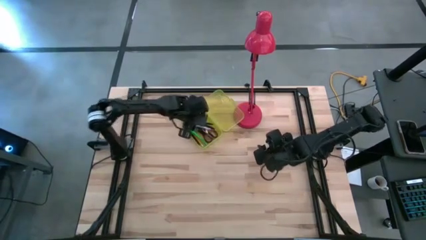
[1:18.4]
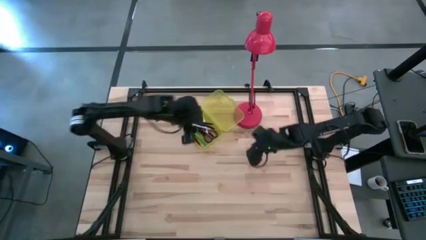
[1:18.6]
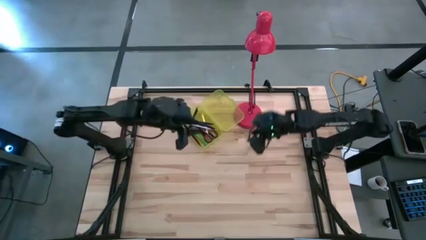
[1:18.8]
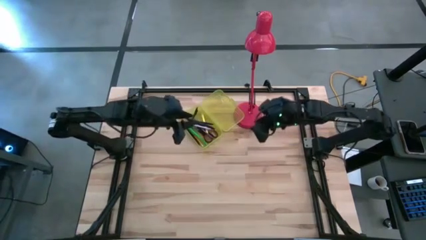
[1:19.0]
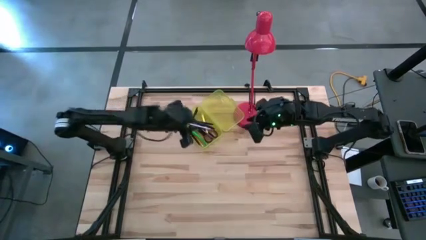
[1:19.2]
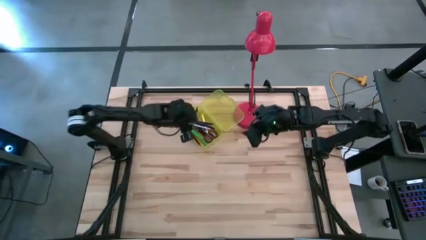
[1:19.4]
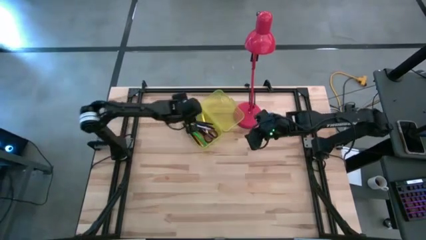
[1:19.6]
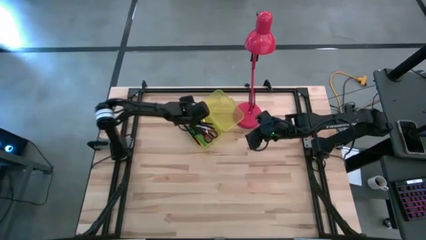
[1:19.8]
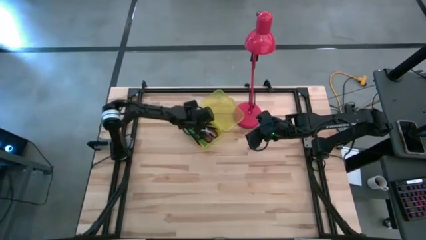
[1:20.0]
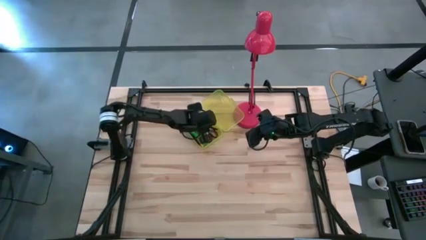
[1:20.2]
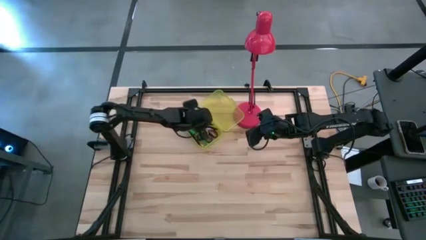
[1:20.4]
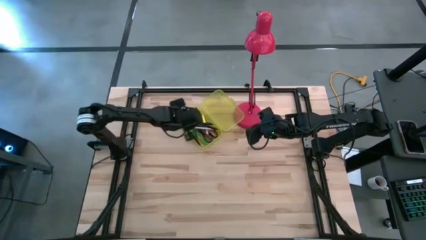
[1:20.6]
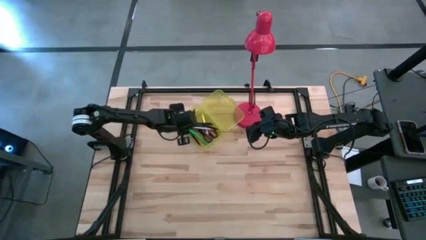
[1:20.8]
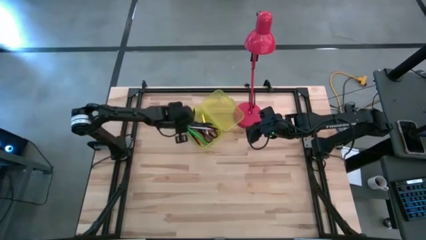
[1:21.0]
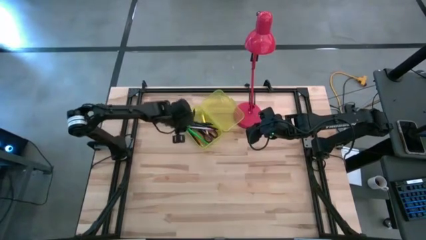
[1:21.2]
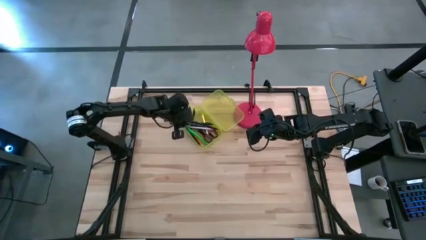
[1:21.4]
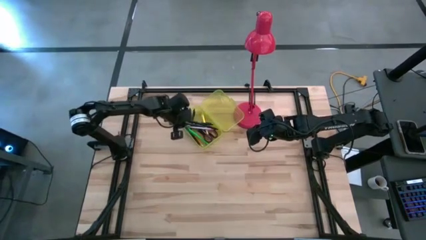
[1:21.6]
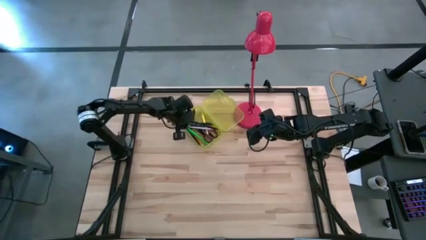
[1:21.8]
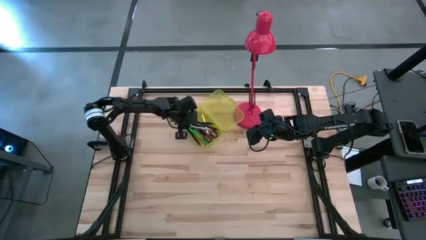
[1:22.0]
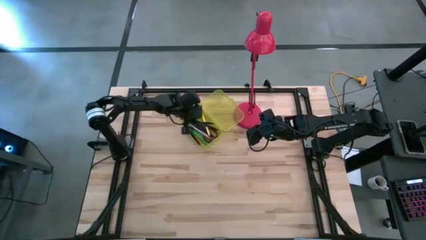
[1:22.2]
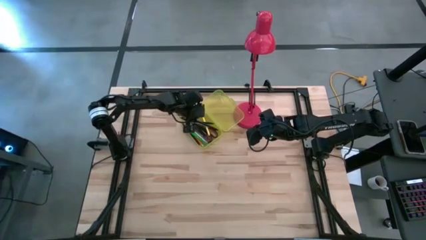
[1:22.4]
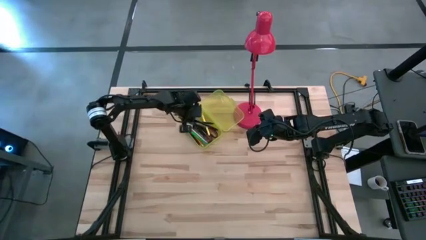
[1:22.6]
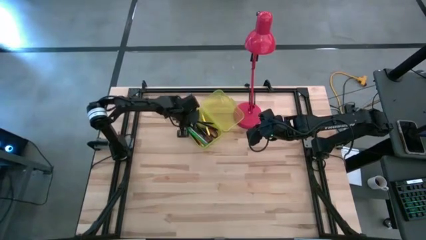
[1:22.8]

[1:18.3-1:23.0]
Task: Pick & place school supplies into a supply box
Adjust the pens inside the yellow supply box

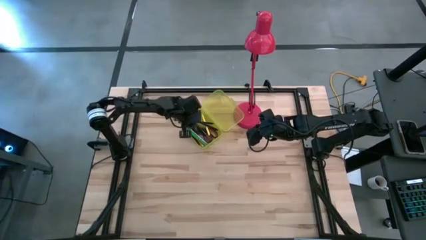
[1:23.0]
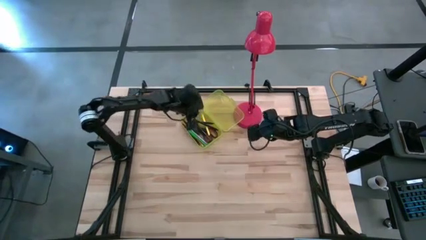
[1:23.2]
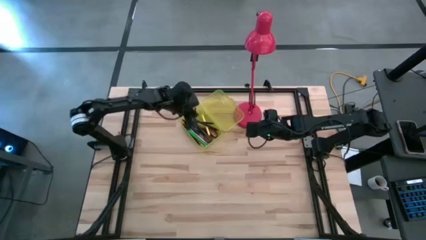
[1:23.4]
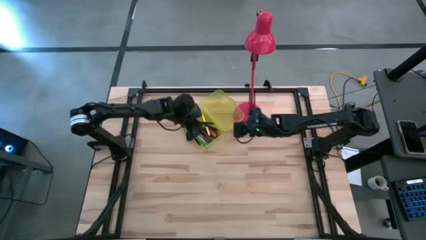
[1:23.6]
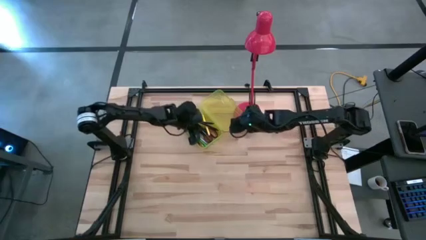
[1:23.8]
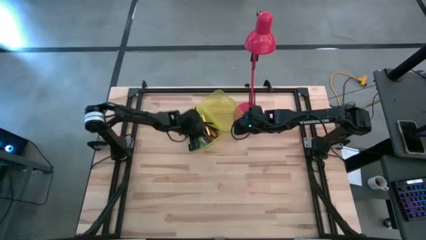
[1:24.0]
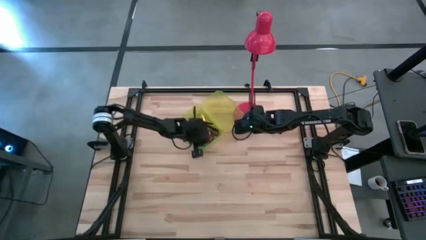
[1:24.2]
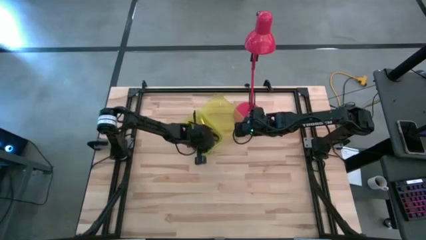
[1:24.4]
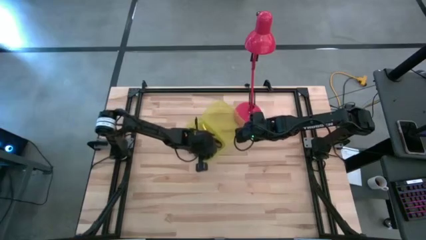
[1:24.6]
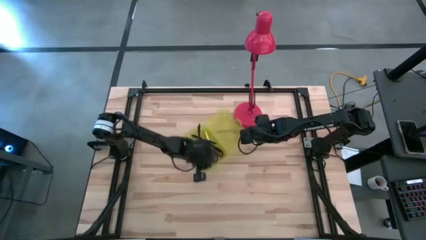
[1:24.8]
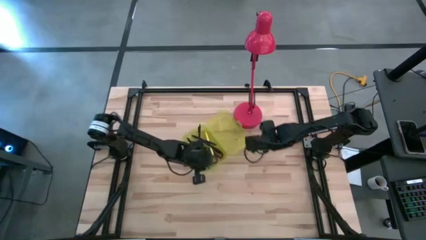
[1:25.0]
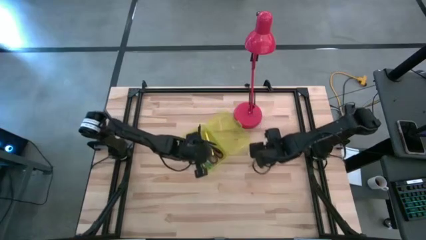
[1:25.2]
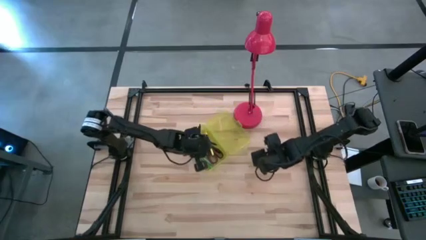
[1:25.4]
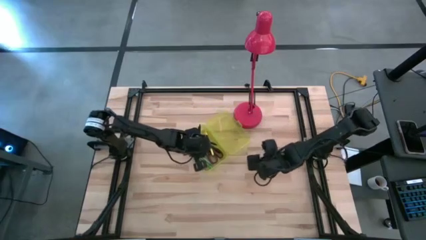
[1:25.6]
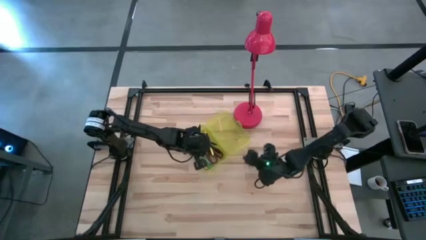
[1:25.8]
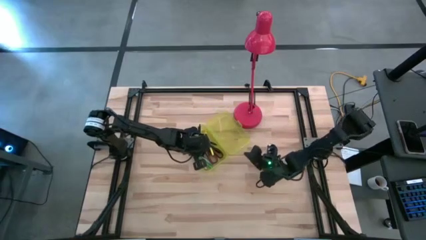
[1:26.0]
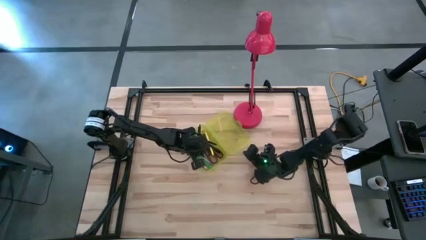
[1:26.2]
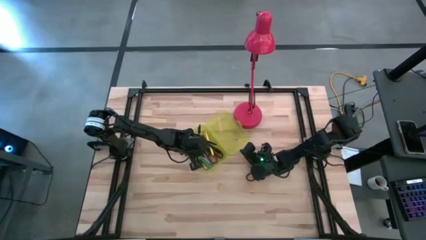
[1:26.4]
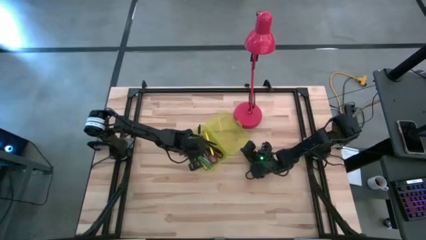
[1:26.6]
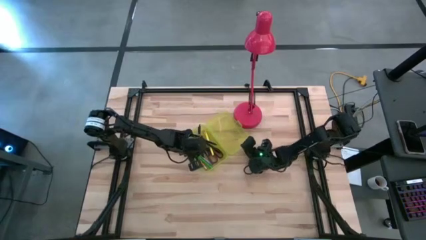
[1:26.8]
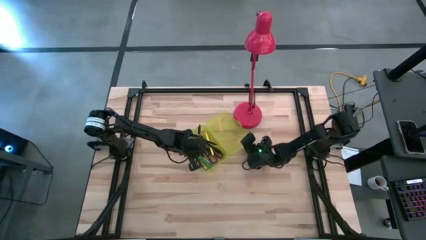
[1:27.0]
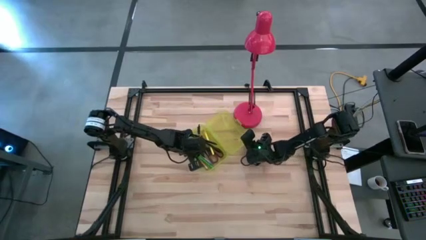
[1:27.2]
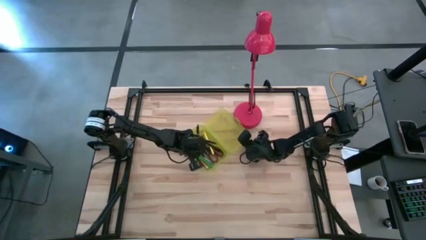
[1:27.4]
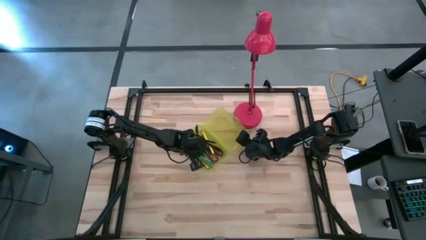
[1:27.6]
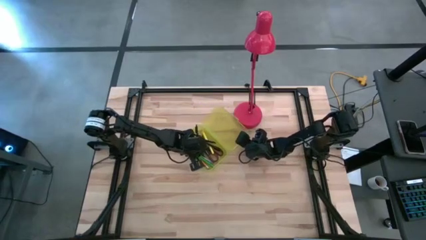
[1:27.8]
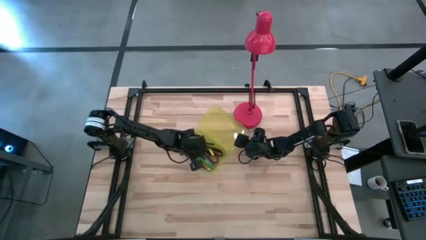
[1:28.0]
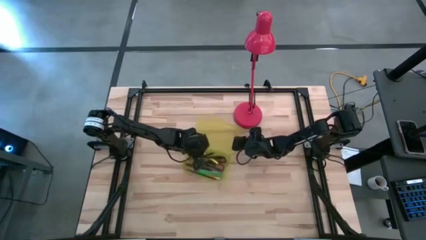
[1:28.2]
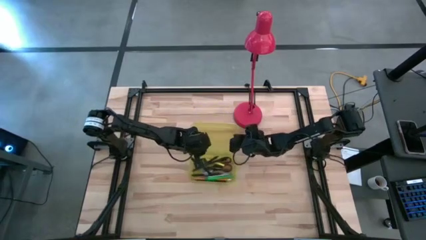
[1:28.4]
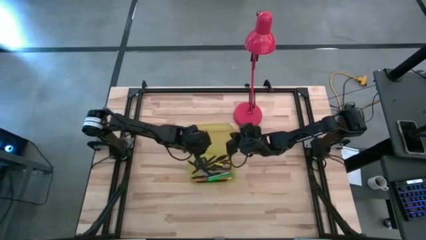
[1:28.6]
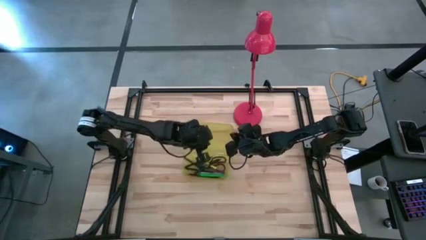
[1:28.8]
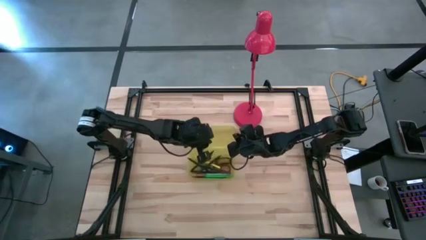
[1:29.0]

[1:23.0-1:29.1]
Move the yellow supply box from the top to the center of the table

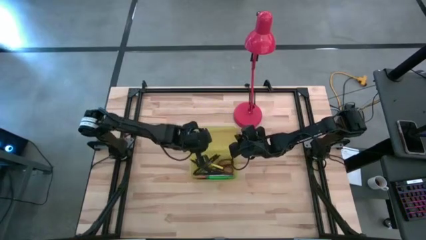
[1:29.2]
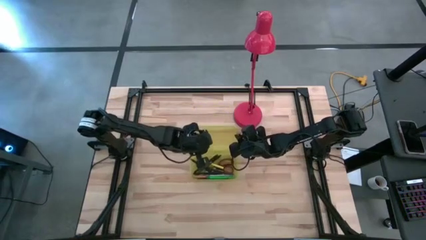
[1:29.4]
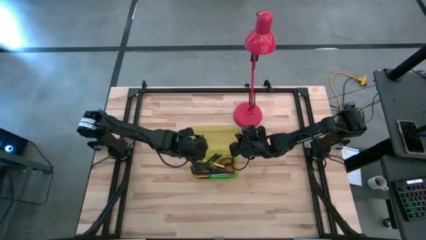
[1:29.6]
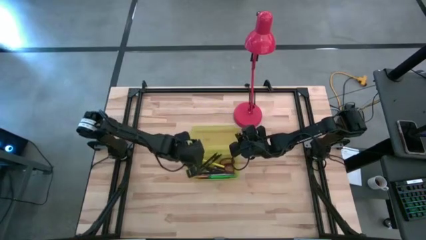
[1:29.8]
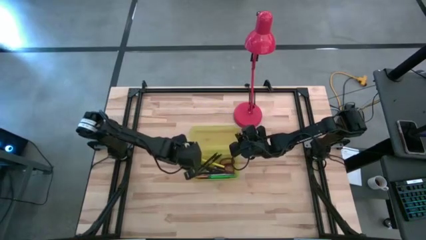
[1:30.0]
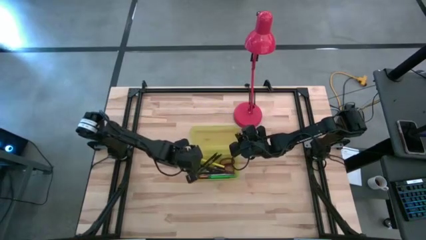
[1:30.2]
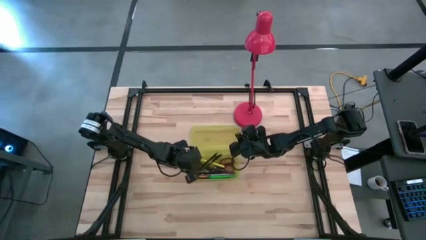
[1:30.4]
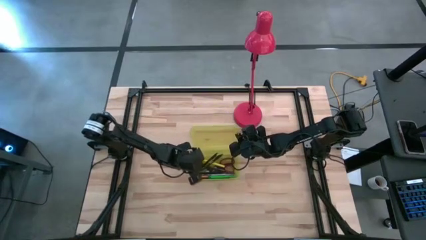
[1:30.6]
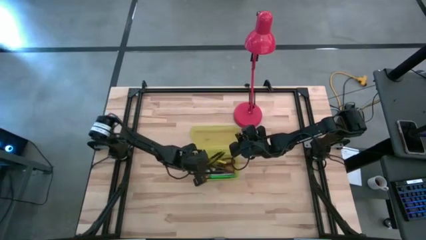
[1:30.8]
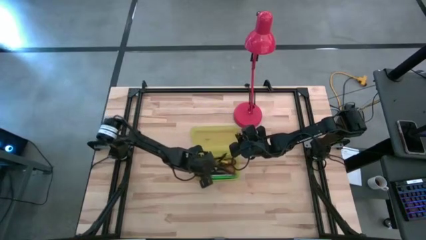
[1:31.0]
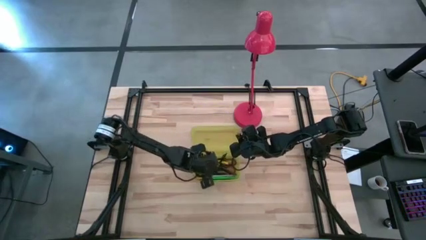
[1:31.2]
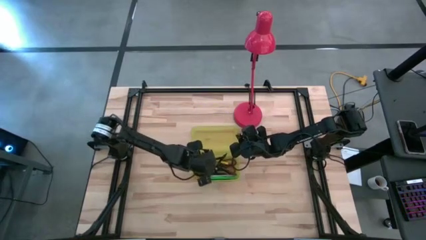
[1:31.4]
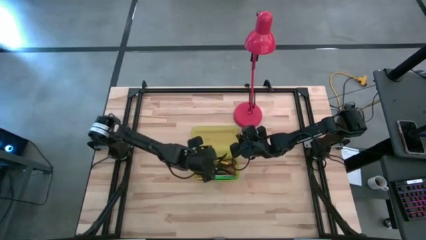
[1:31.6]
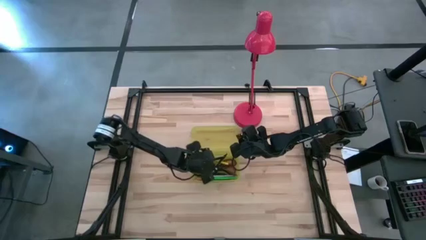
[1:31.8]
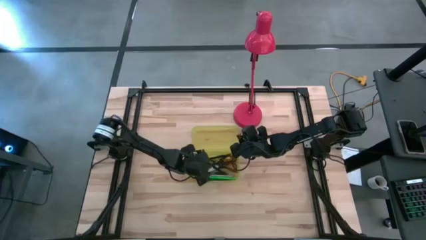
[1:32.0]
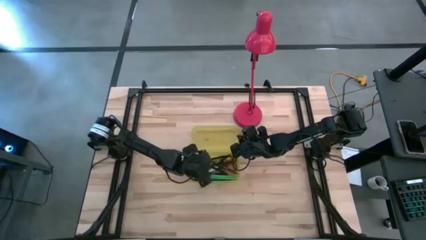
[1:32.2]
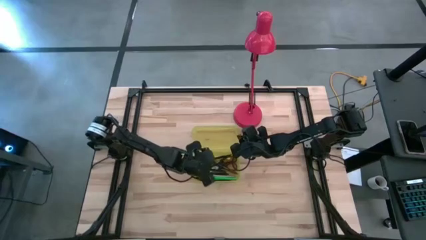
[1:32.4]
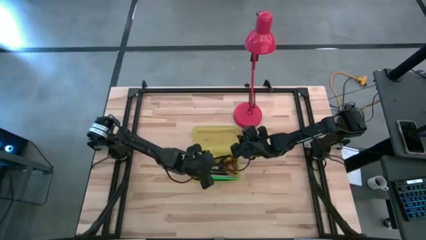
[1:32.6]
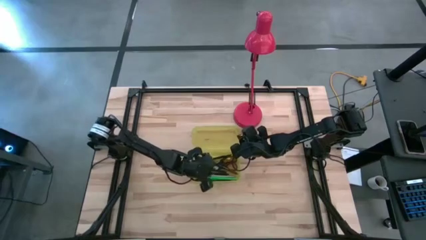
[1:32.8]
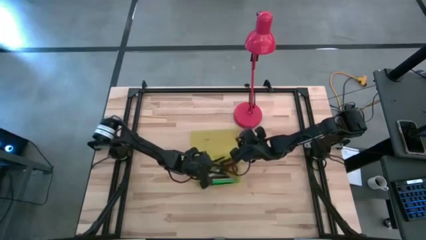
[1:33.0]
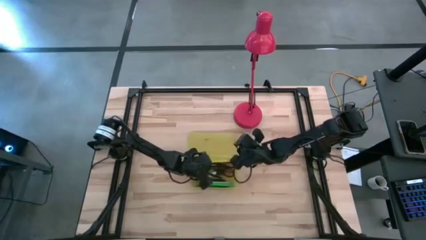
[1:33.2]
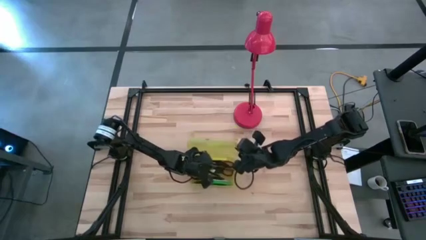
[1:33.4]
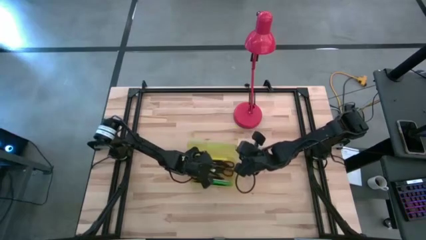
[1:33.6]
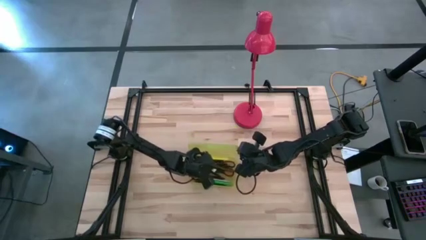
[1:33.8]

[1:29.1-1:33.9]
Adjust the pens inside the yellow supply box

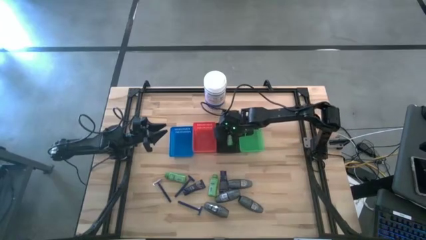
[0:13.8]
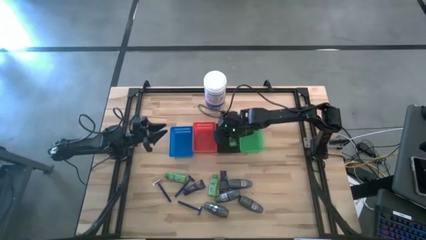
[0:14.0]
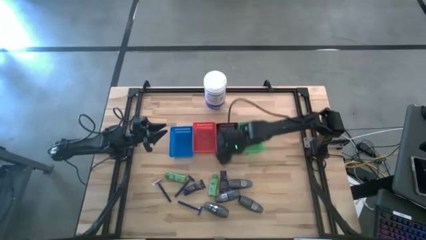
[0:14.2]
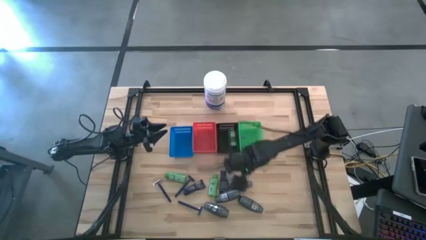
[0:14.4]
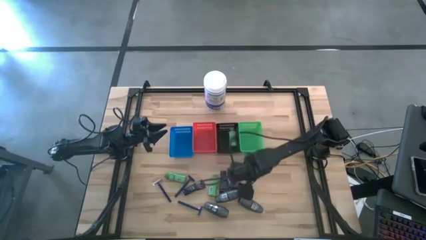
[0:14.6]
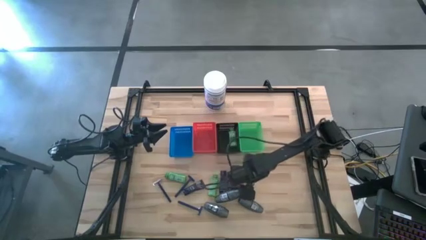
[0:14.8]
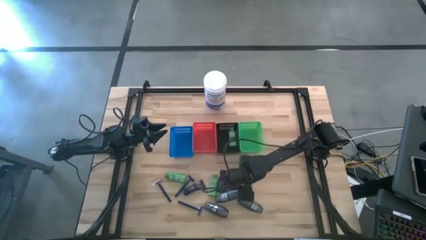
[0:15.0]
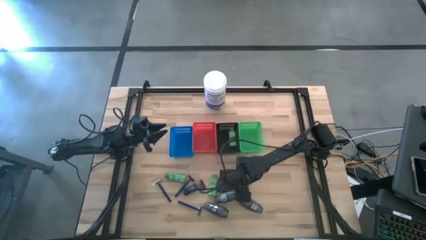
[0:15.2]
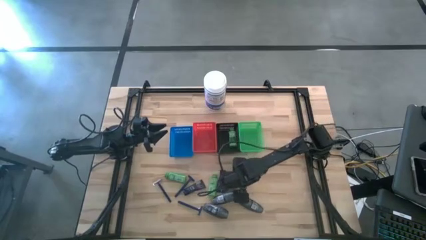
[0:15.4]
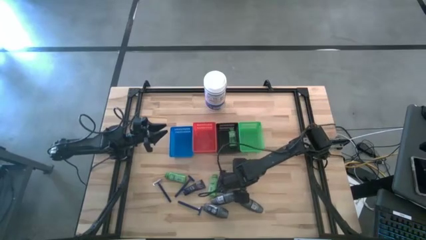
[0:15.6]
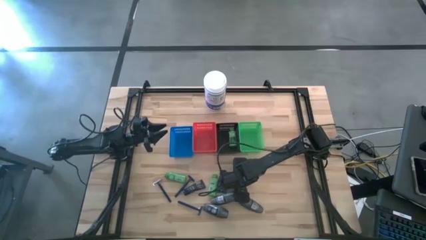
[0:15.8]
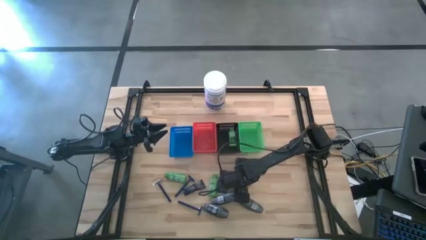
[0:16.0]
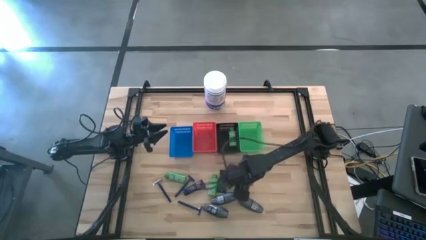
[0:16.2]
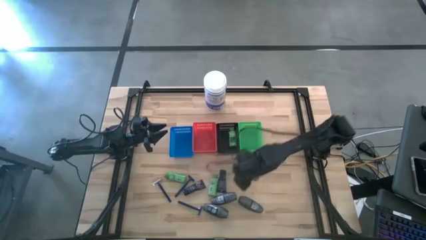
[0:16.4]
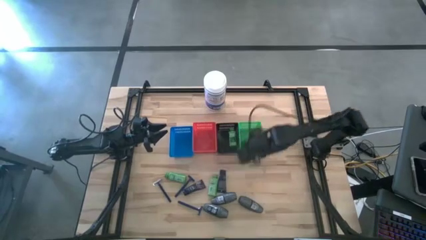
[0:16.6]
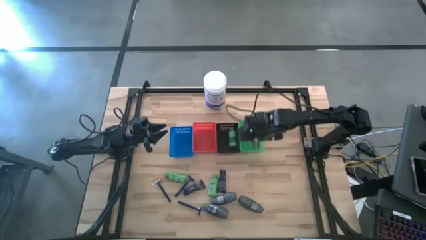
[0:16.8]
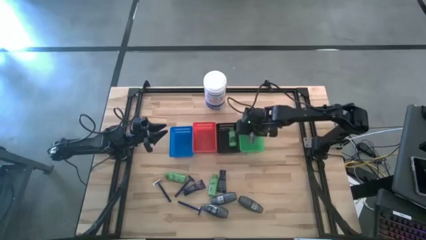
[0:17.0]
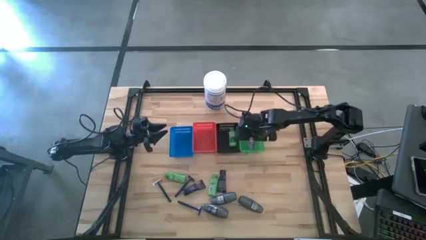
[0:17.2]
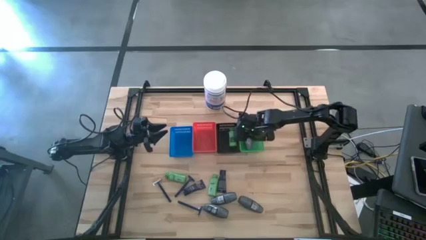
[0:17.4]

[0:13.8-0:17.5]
Task: Pick & Place Travel size toiletries
Put the black deodorant into the green basket
